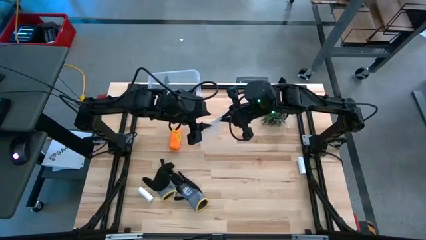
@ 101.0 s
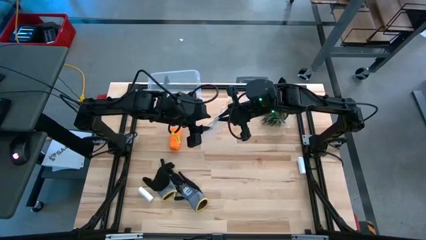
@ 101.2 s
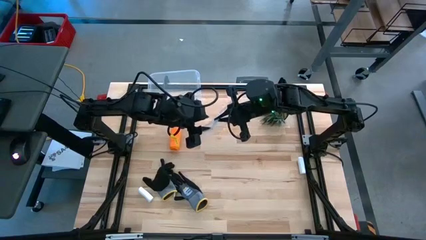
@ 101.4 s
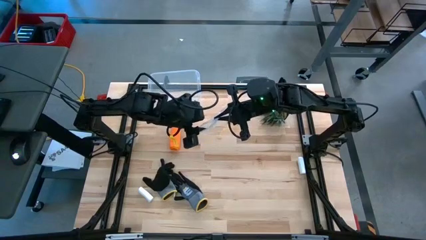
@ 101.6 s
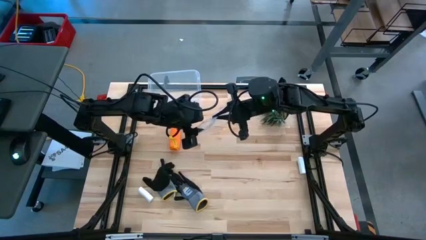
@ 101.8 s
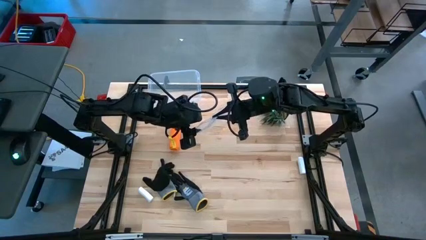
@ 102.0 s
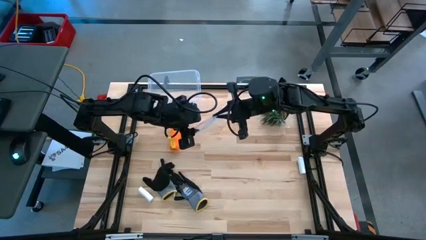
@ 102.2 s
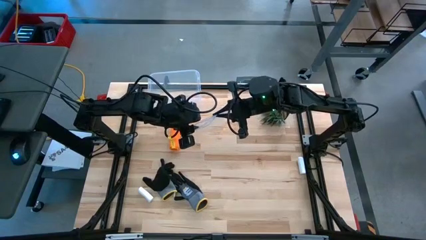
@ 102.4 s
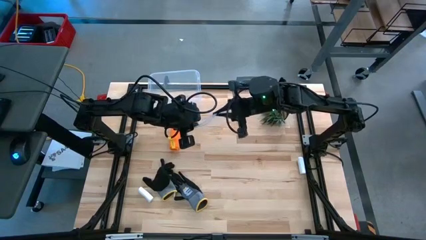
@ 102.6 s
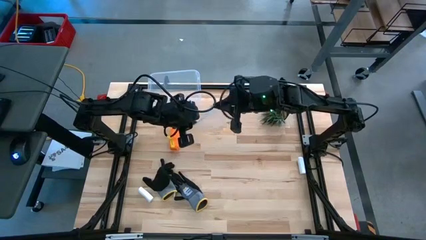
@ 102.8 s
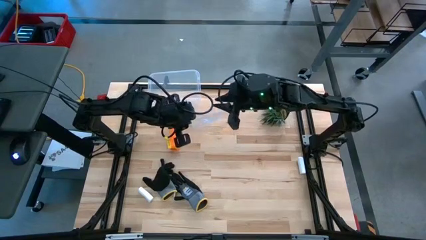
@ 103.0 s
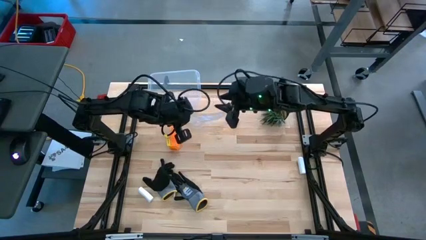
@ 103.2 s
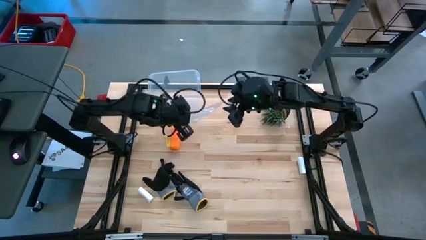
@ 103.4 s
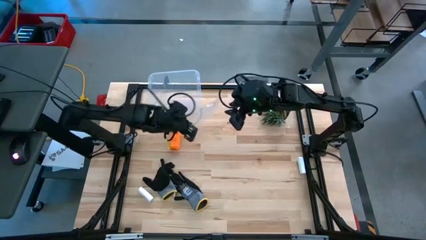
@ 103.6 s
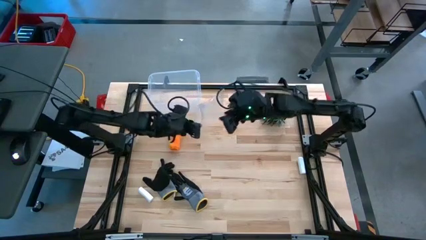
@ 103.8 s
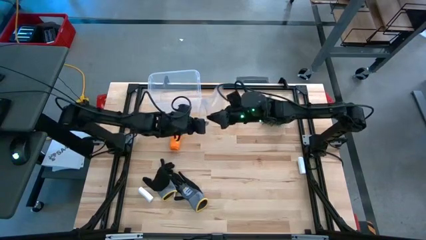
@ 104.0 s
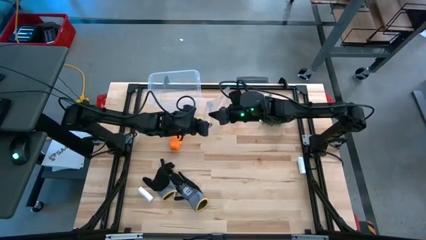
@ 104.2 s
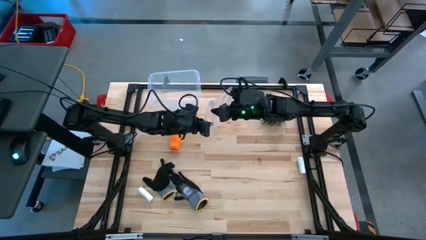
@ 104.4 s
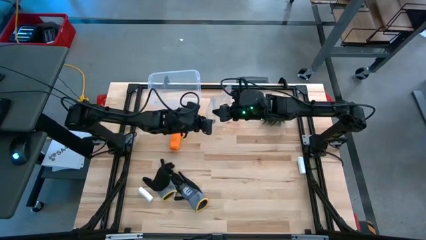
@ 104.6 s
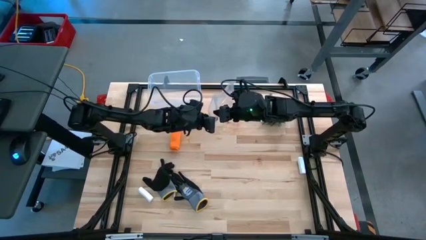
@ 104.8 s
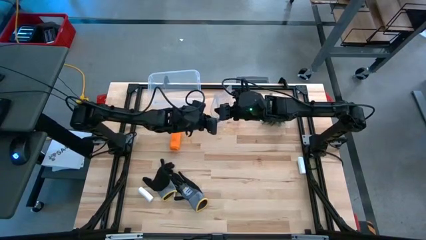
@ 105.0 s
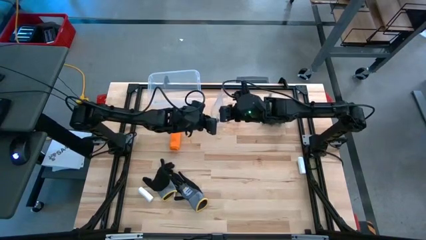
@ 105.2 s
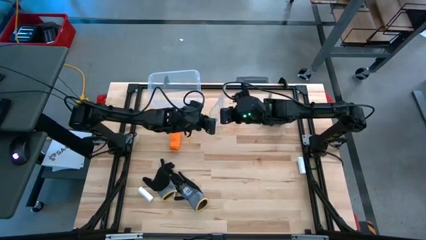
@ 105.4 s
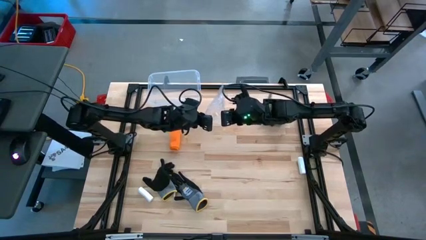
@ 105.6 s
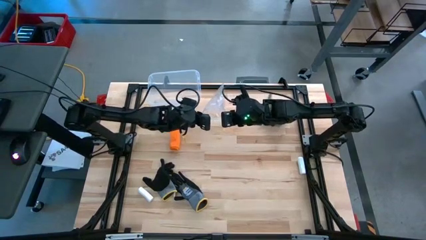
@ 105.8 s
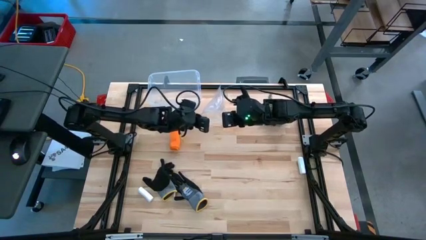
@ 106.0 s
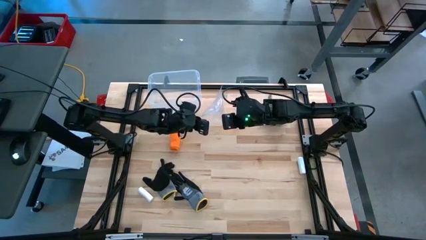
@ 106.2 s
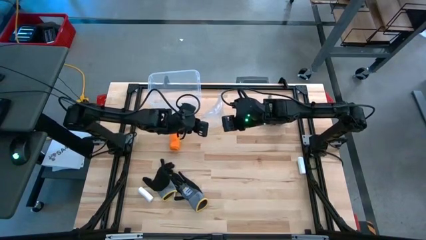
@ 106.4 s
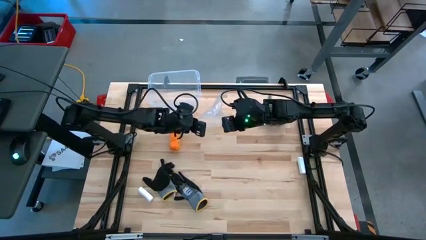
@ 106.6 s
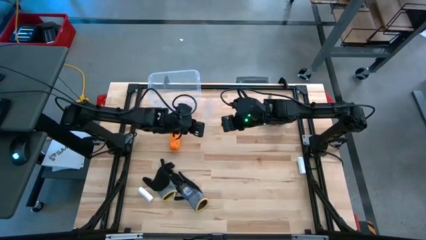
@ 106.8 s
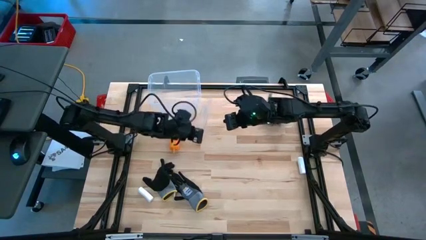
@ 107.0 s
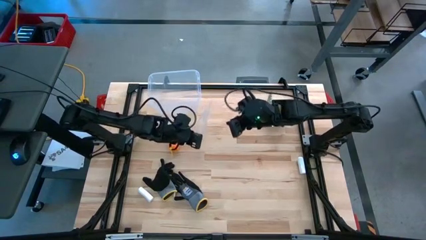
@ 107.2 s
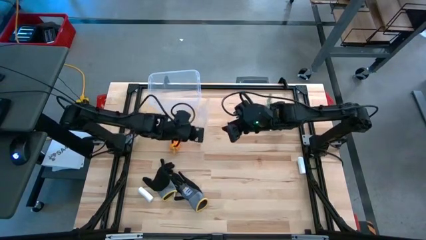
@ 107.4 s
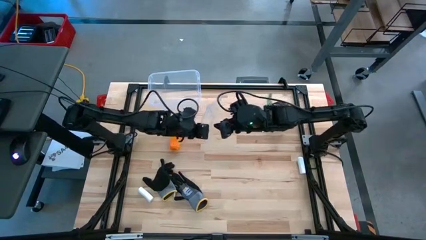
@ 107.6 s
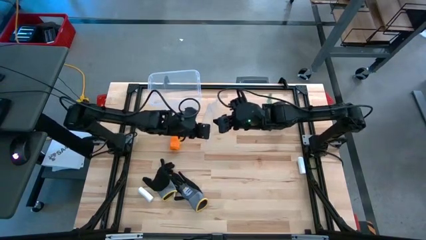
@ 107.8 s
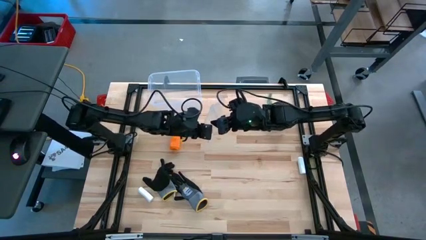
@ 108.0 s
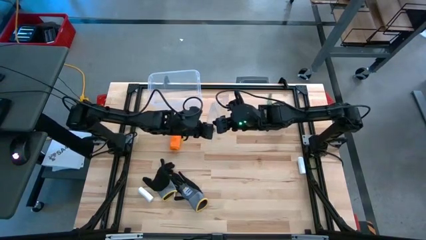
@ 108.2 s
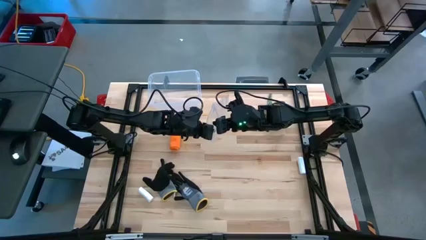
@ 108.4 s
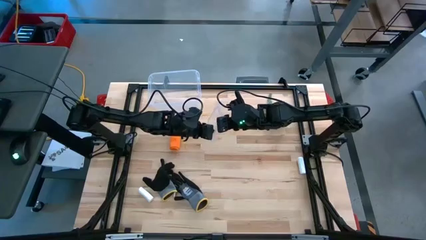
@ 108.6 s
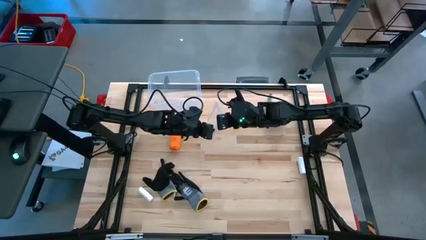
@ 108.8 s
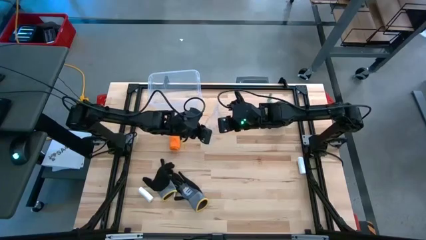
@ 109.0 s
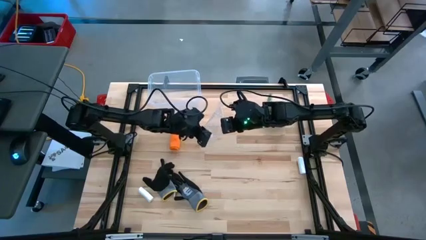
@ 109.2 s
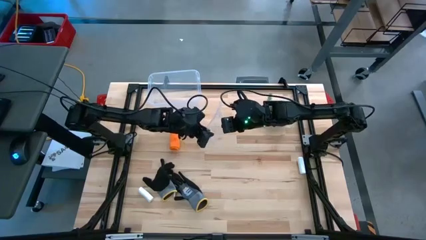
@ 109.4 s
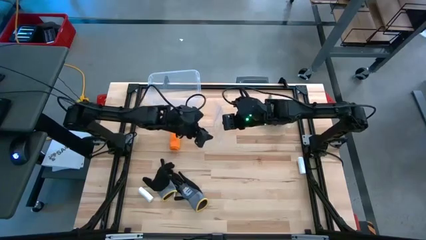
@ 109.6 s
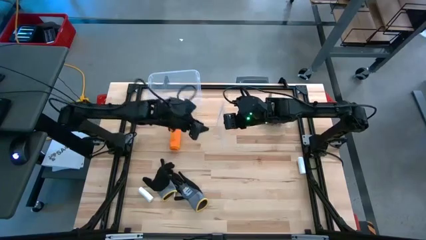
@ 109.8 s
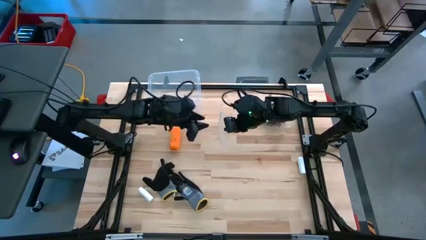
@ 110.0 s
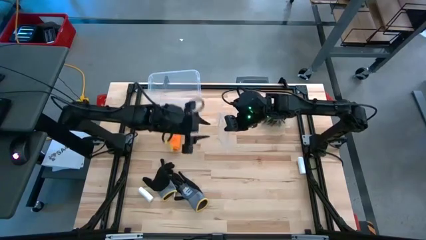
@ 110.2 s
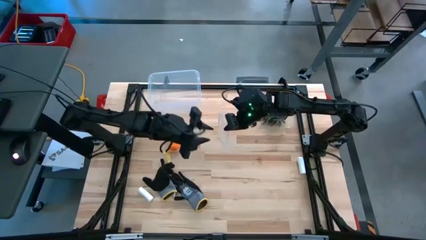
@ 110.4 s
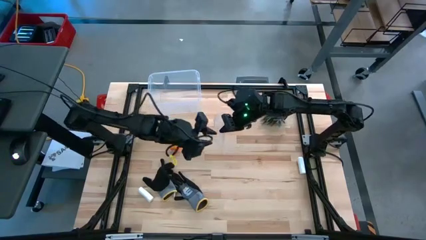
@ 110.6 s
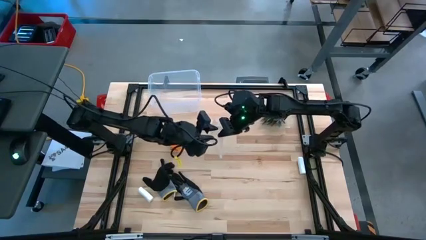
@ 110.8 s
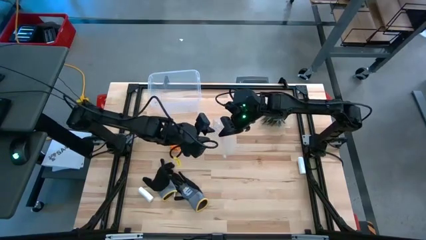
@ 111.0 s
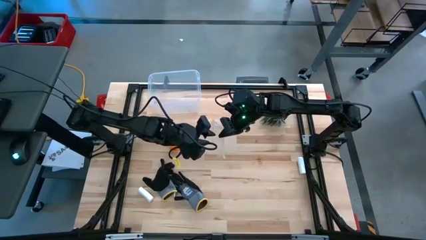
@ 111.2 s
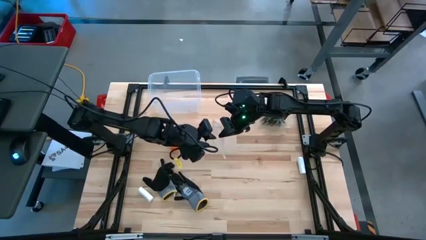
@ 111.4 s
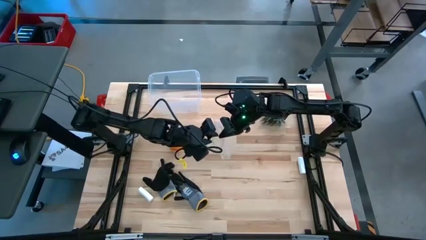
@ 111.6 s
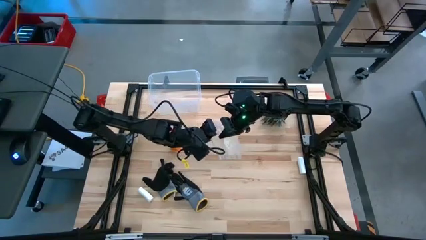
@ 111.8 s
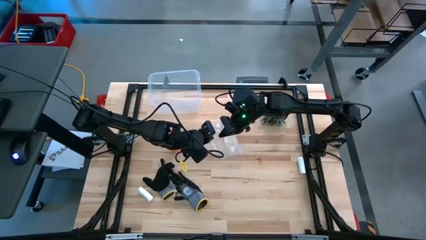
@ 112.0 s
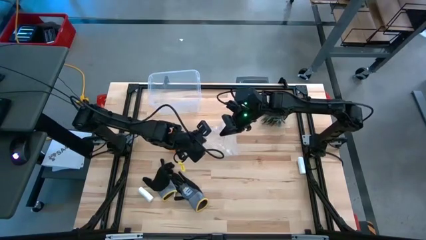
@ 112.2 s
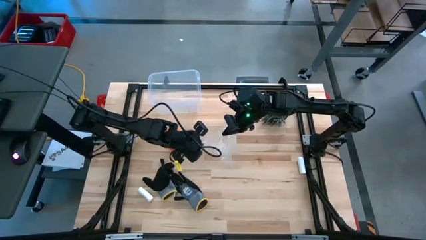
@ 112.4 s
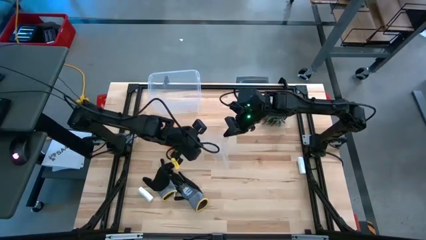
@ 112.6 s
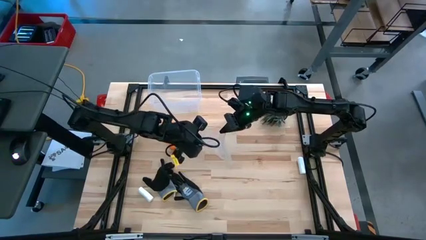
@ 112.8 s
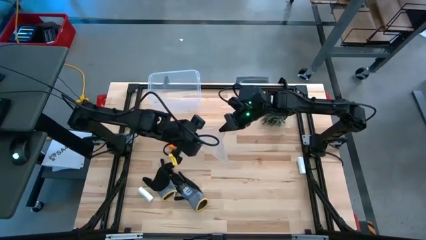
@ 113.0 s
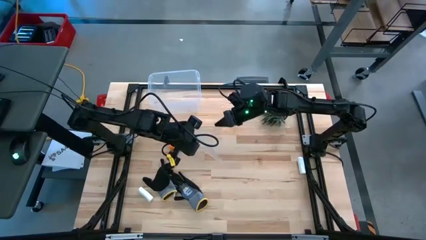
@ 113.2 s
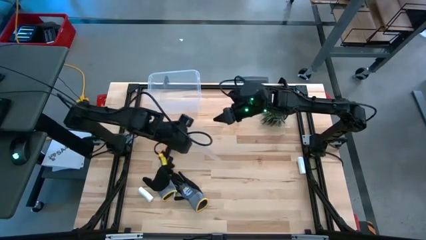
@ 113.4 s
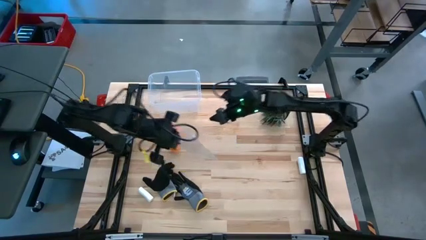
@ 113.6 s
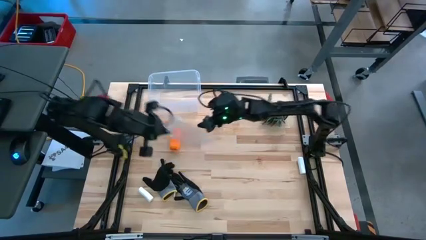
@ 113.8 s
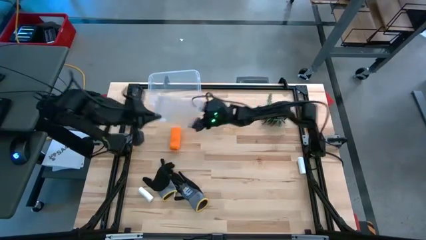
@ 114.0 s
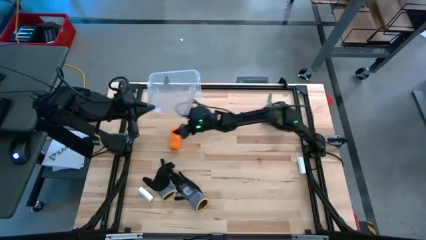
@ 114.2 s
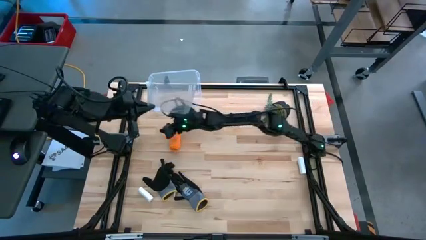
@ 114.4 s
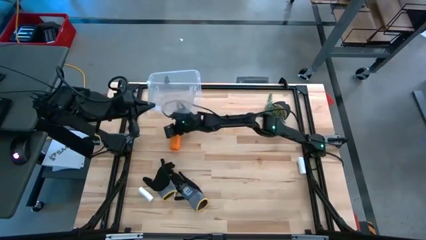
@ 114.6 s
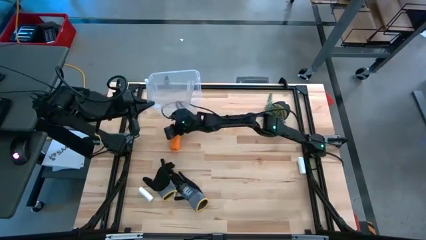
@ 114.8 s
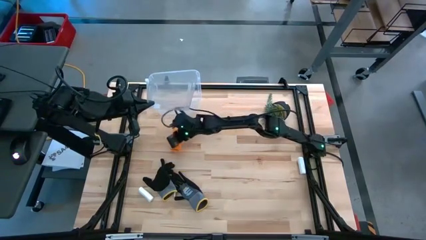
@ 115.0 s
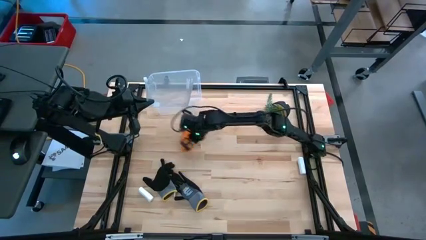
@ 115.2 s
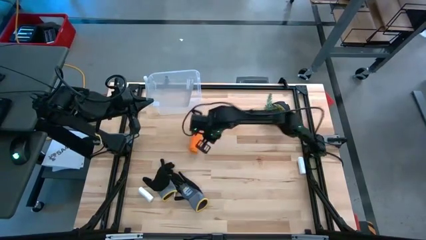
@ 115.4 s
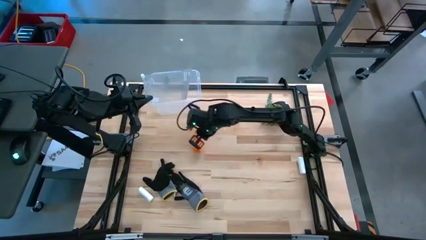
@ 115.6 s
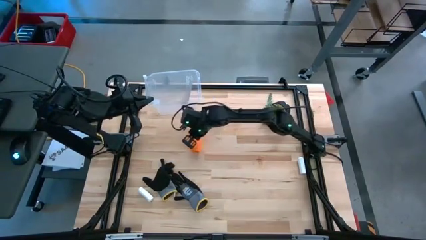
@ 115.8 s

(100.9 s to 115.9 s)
Task: Roll bandage
Put the rolled orange bandage into the transparent zip bag

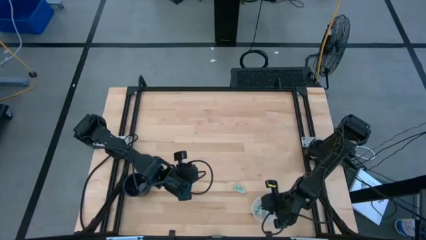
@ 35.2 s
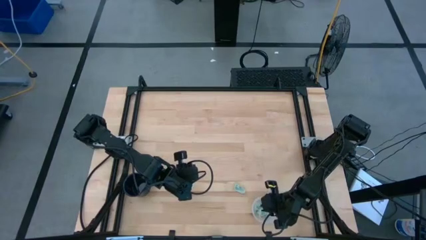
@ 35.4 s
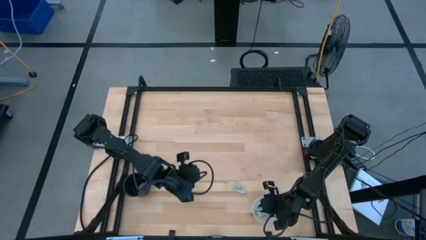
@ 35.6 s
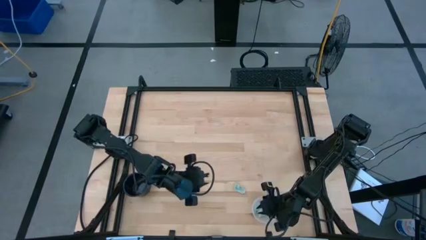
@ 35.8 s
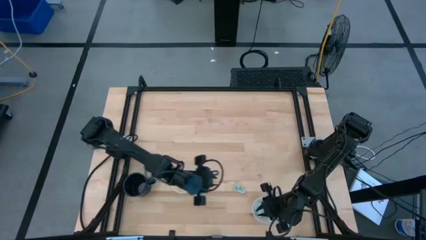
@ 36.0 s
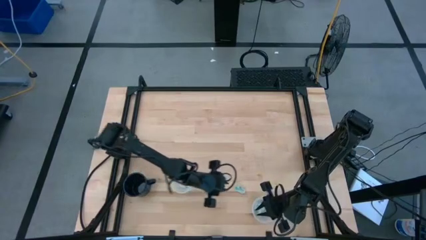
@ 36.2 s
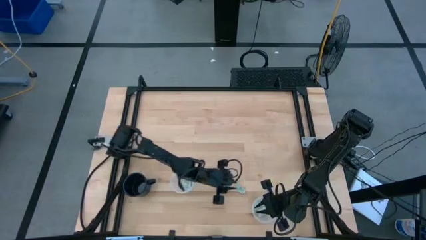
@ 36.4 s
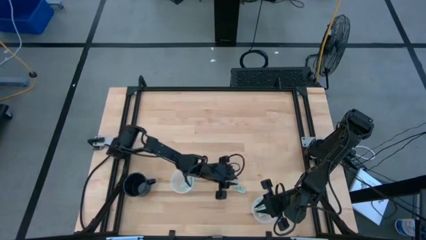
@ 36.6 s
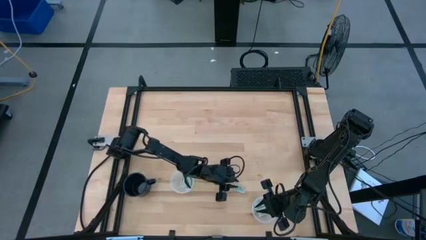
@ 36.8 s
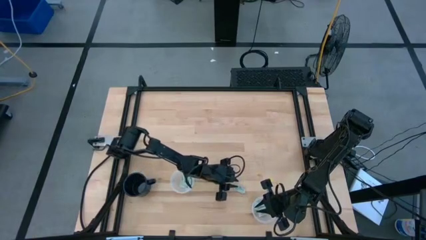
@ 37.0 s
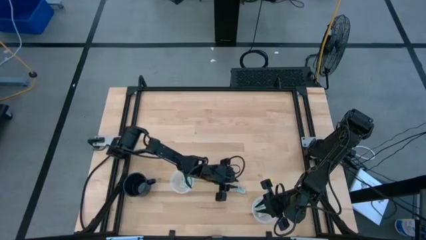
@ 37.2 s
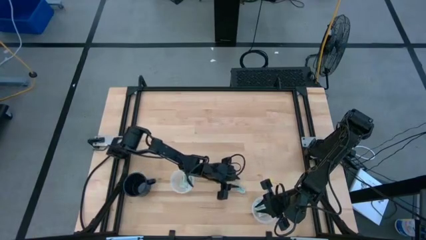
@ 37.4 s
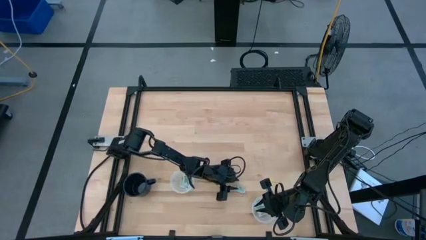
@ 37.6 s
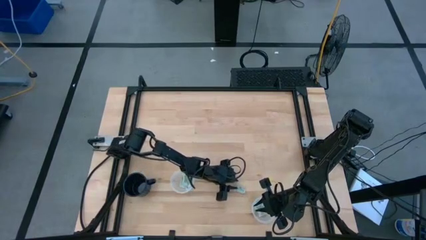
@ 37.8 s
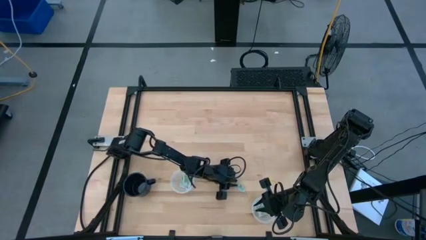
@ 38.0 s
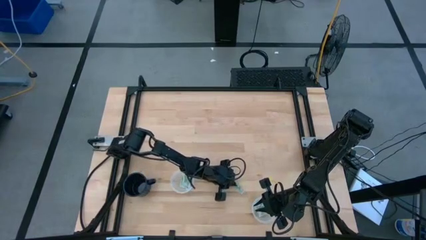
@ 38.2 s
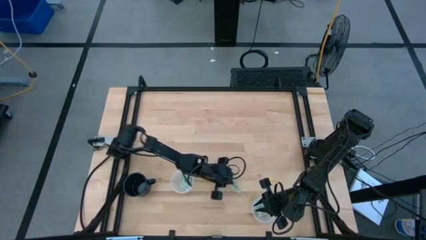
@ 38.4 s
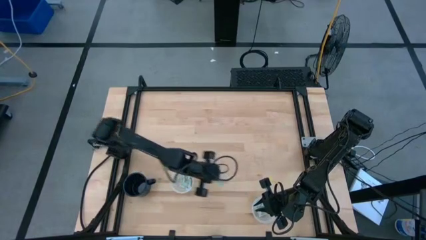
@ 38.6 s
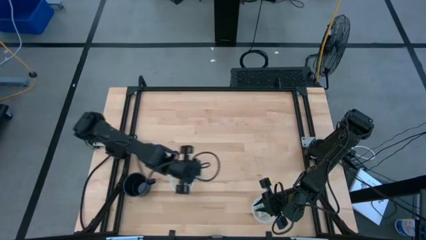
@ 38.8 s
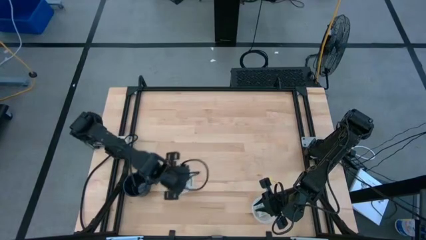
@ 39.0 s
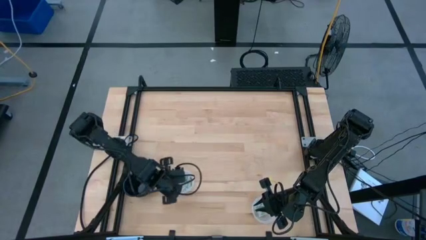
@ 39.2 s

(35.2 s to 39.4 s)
Task: Pick and place items into bin
Put the stevia packet into the top transparent bin
